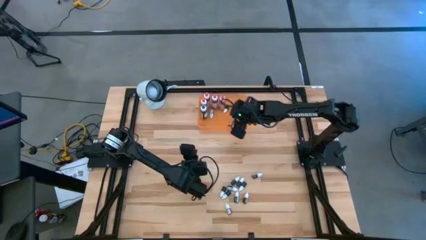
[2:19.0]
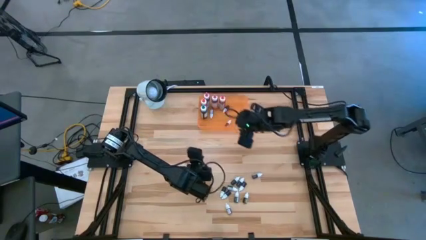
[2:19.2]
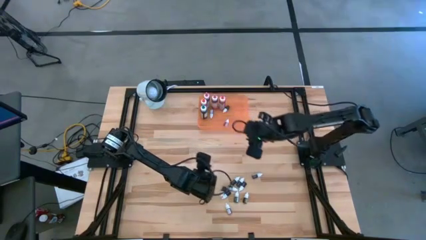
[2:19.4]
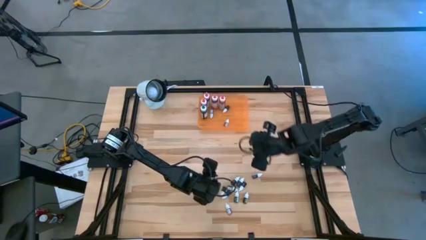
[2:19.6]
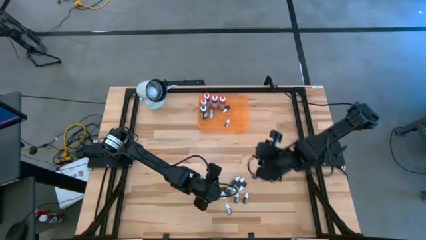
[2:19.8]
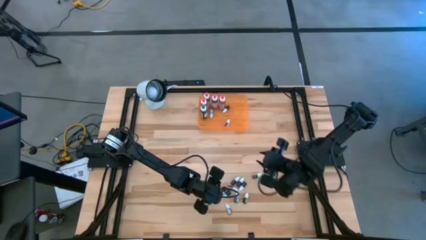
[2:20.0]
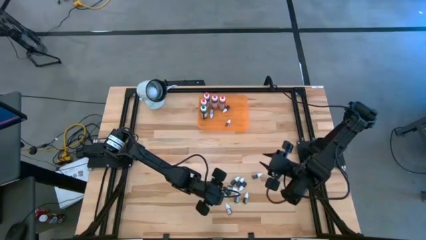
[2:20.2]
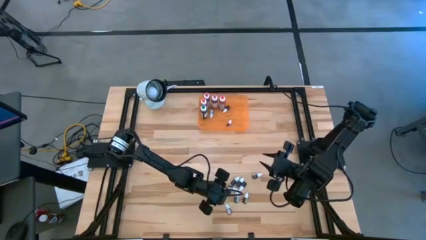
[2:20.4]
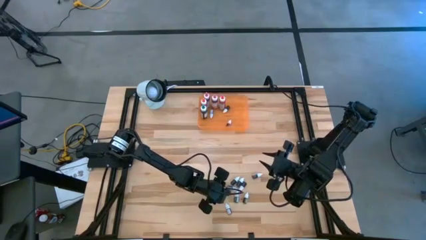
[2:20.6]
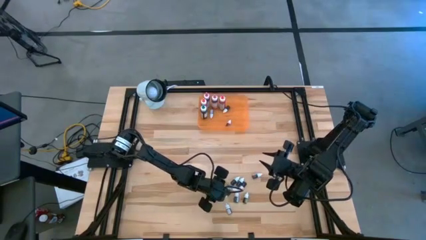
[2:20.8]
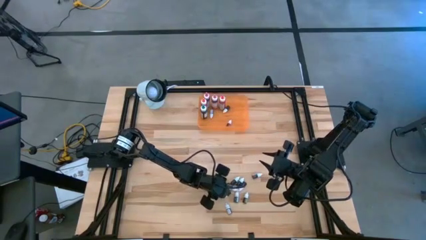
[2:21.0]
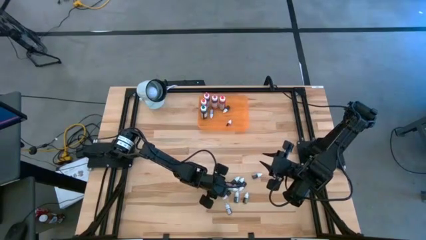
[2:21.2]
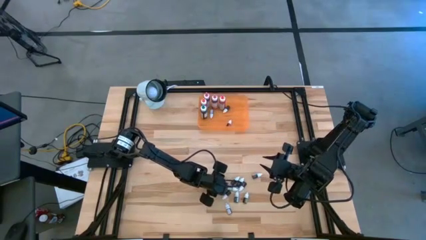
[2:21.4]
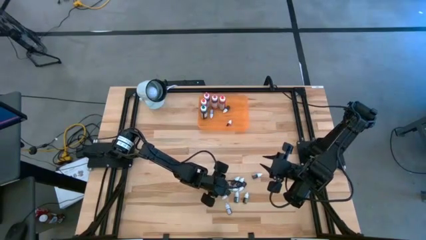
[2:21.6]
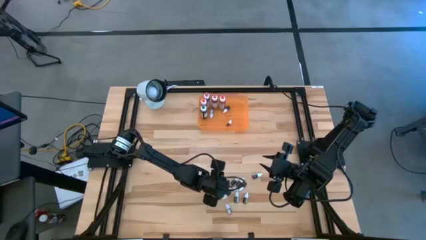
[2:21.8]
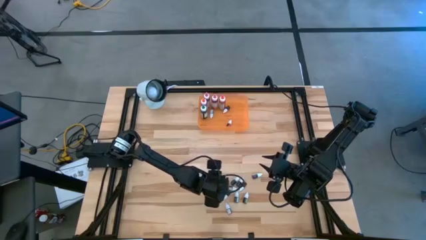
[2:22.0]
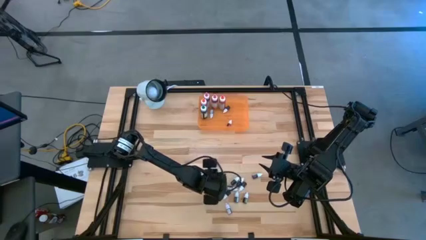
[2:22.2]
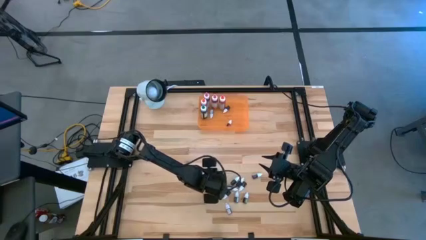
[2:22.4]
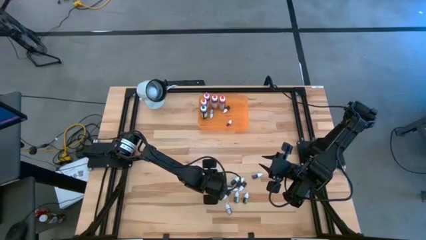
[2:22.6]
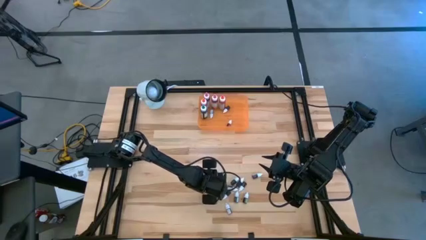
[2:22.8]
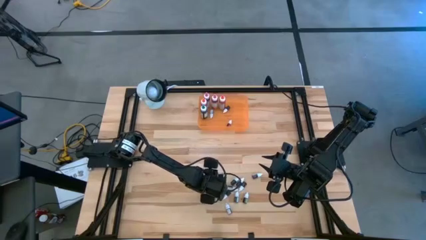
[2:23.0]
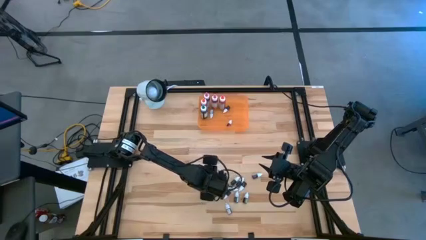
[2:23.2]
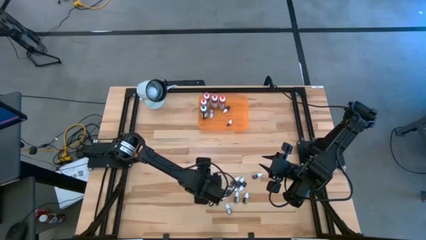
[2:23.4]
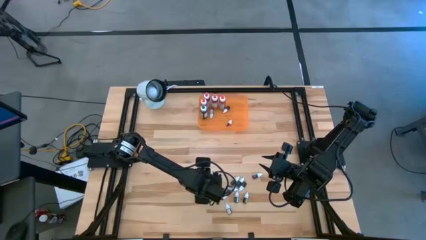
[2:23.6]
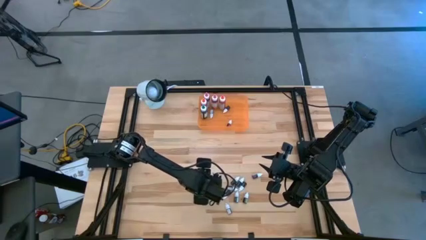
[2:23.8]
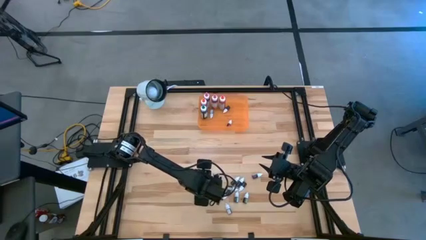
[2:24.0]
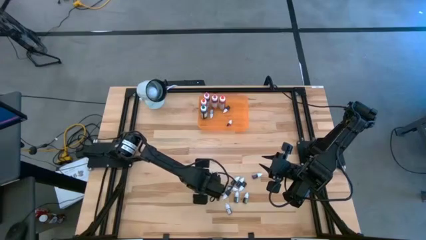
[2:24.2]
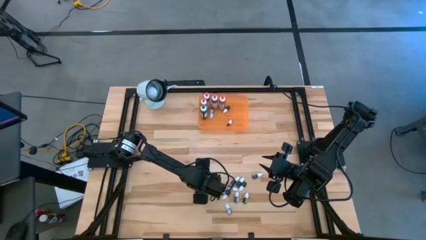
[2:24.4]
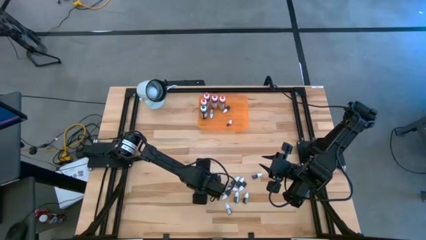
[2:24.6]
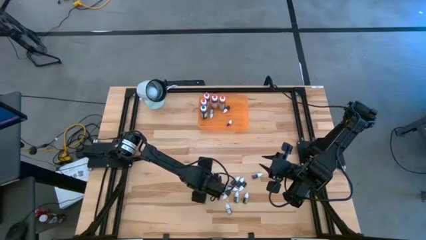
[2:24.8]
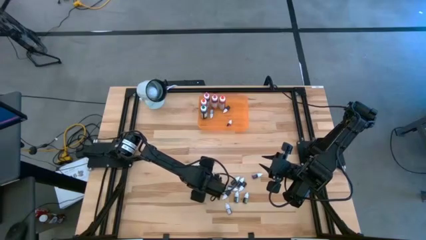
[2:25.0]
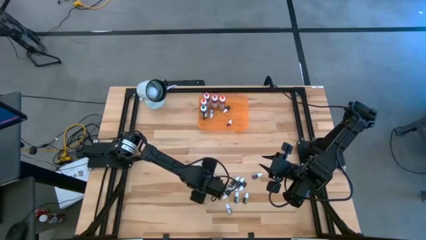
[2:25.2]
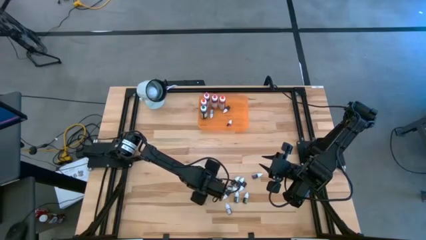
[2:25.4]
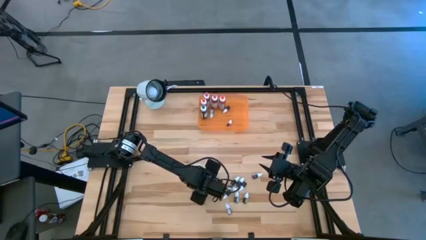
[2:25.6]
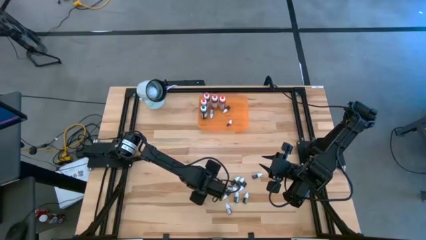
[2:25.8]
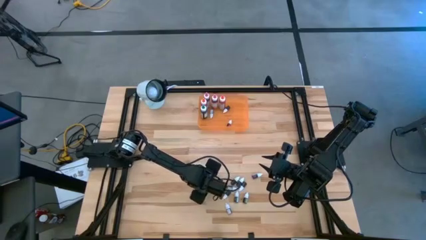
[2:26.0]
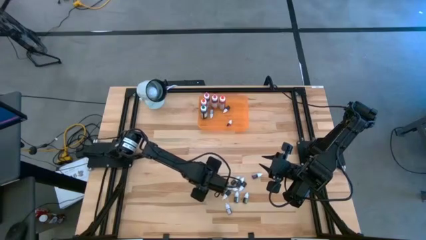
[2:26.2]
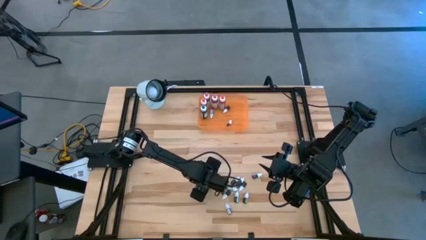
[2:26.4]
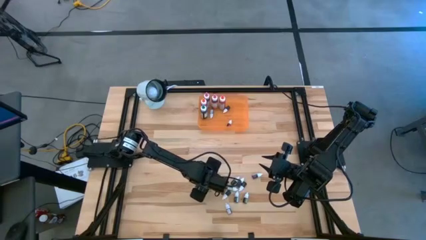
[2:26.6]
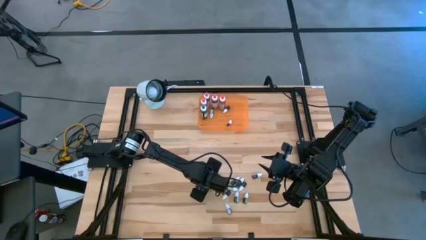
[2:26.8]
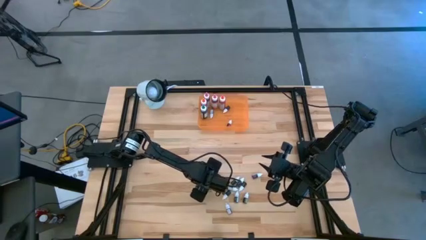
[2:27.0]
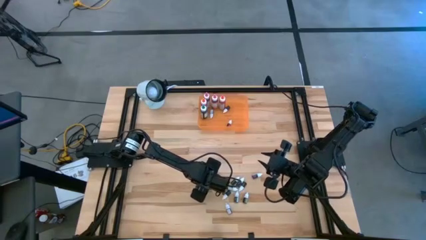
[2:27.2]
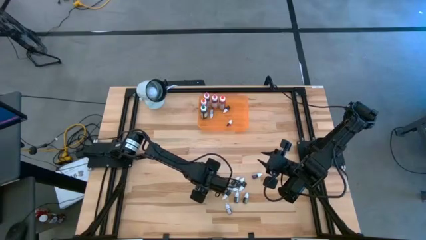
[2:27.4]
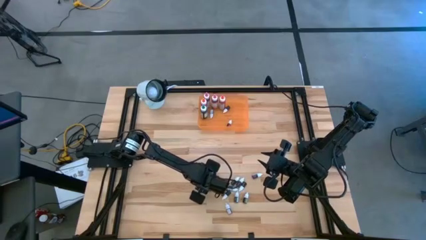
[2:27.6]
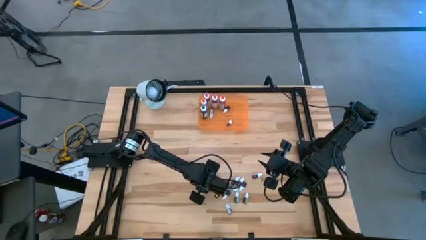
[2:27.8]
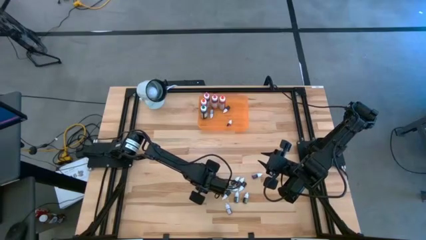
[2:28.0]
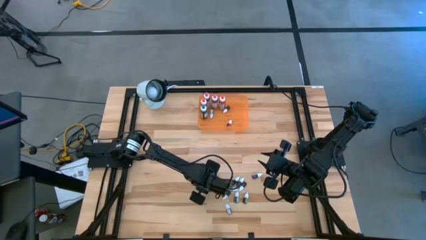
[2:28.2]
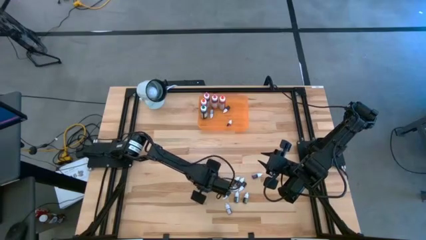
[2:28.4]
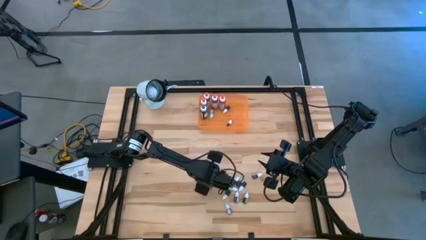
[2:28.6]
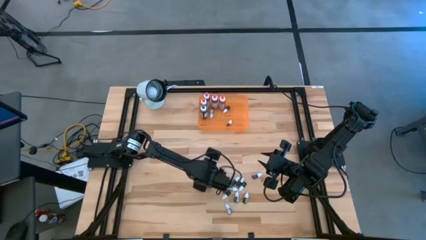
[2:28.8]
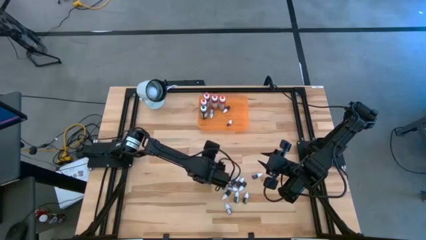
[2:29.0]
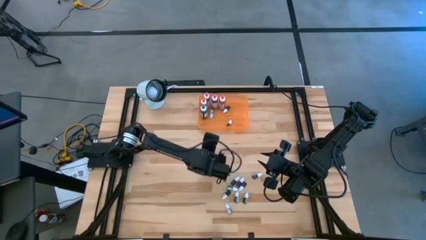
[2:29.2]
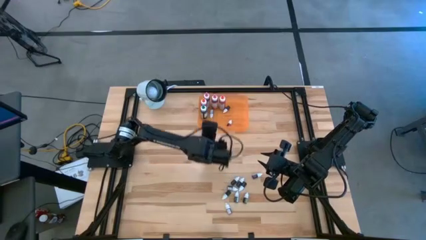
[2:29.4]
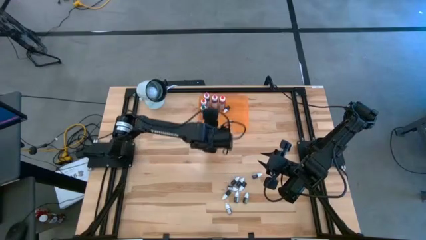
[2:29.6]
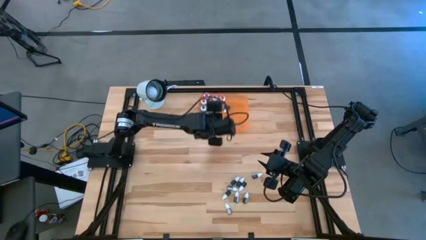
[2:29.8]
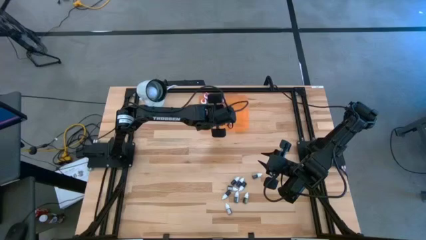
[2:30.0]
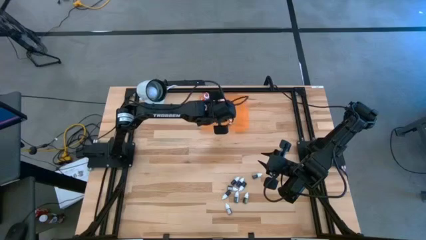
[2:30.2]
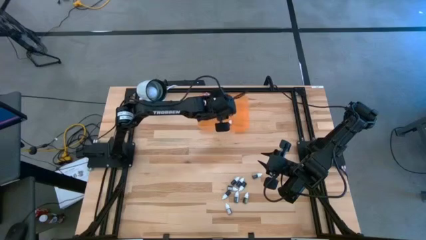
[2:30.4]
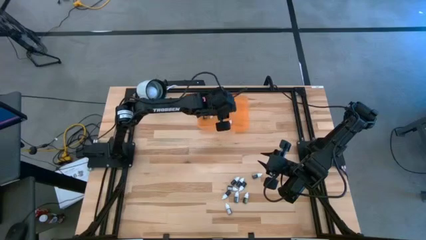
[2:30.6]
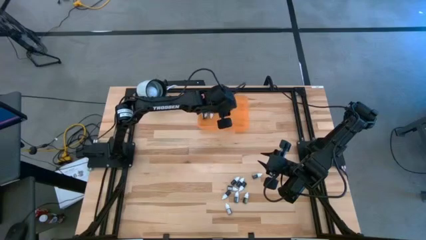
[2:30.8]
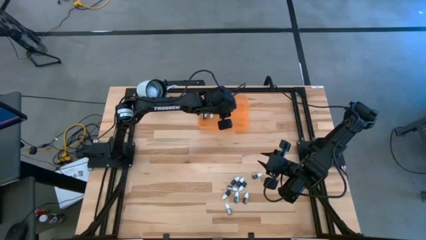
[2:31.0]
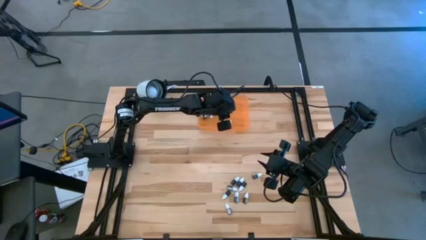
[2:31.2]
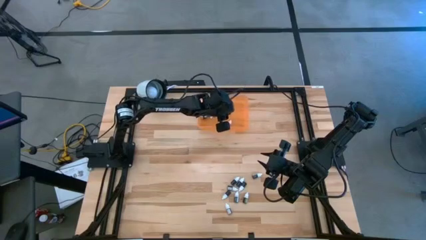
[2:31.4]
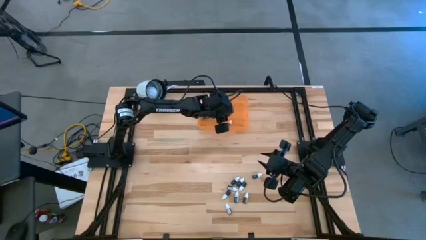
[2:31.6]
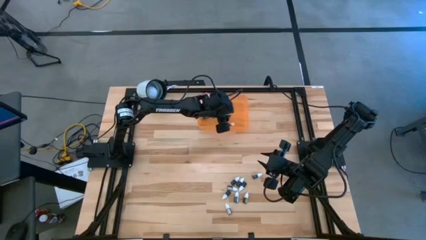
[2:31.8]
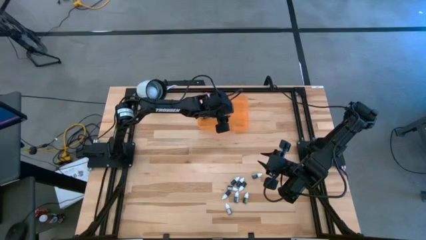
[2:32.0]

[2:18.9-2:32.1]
Task: Pick & Place food coloring
Put the black small food coloring bottle into the orange bin

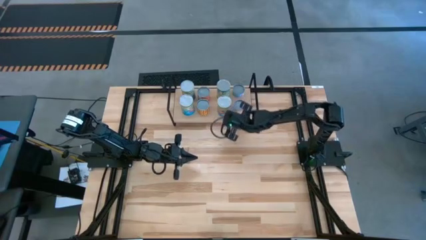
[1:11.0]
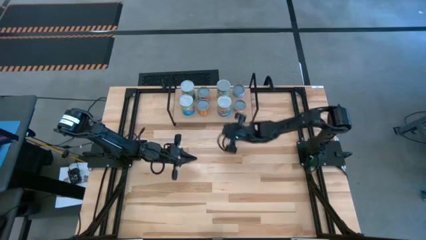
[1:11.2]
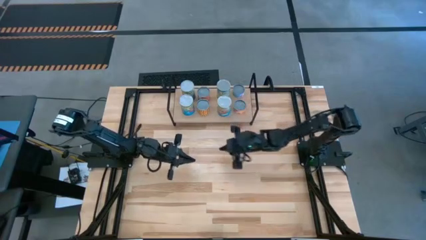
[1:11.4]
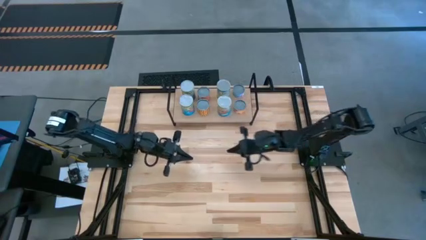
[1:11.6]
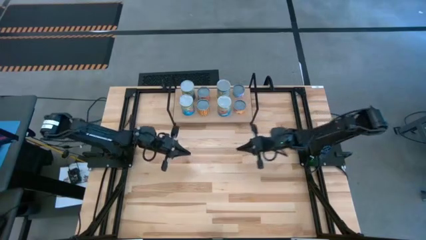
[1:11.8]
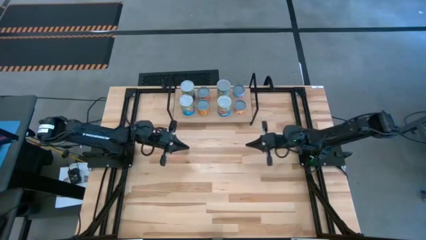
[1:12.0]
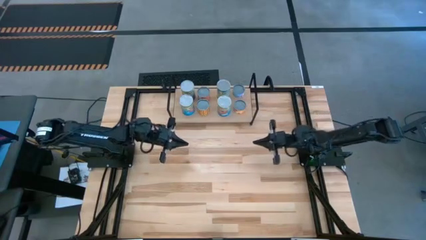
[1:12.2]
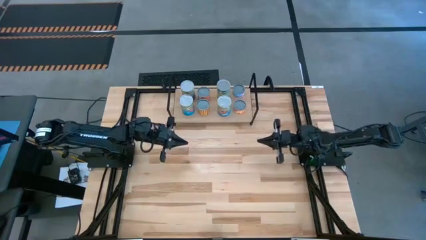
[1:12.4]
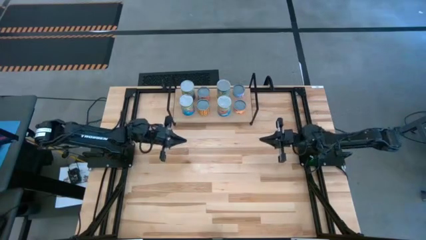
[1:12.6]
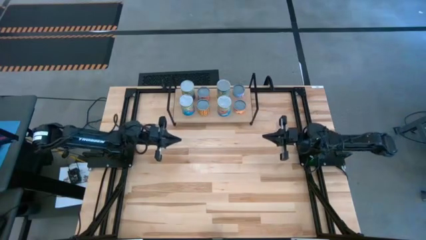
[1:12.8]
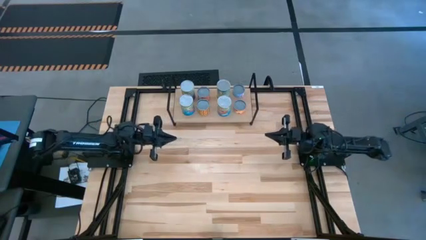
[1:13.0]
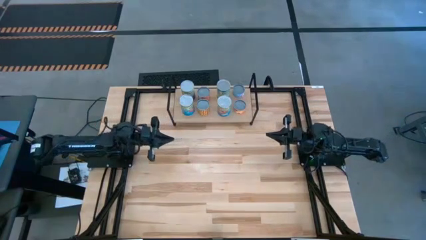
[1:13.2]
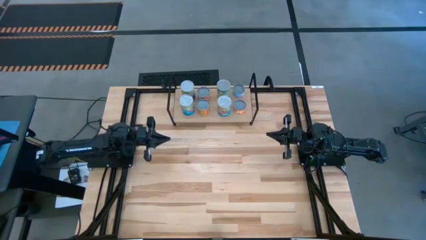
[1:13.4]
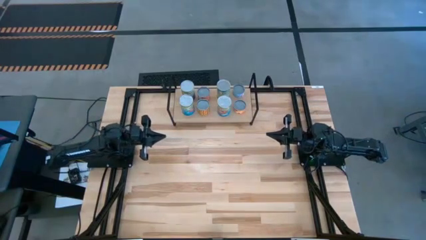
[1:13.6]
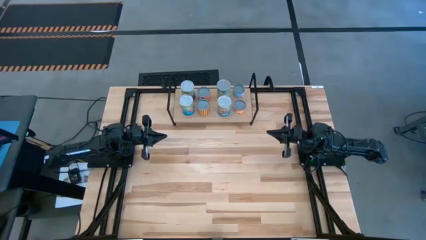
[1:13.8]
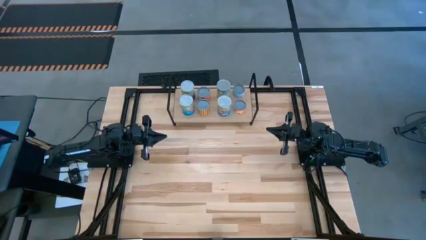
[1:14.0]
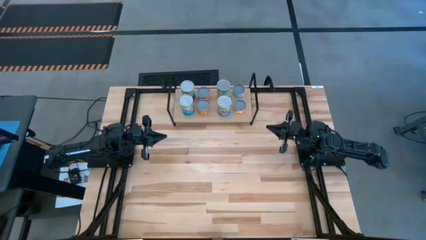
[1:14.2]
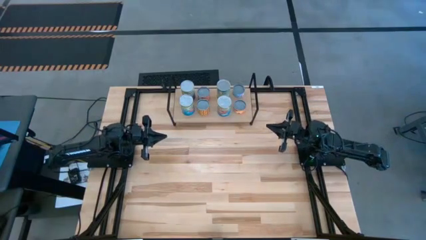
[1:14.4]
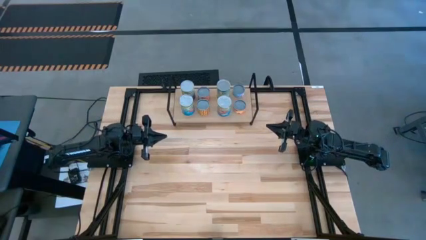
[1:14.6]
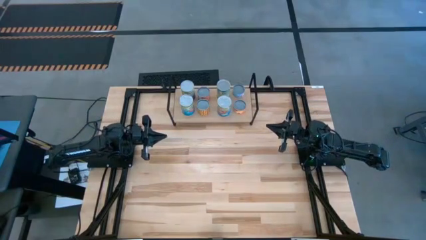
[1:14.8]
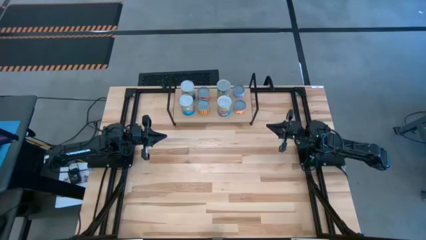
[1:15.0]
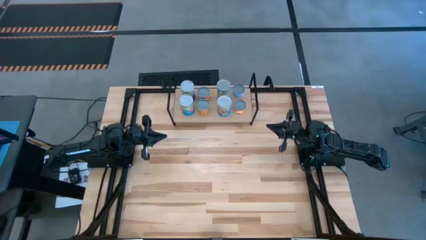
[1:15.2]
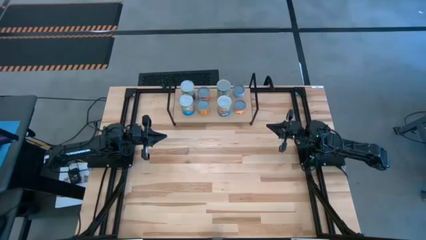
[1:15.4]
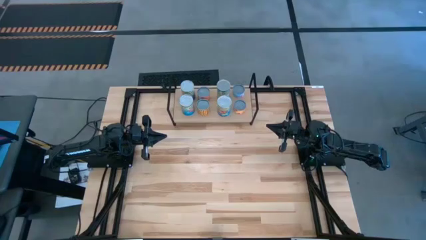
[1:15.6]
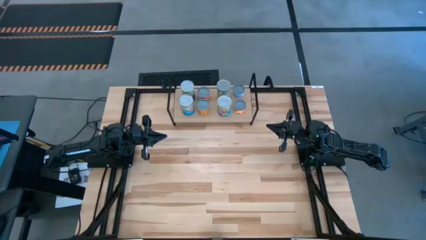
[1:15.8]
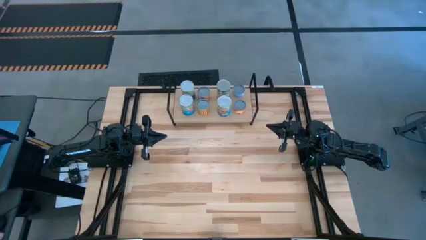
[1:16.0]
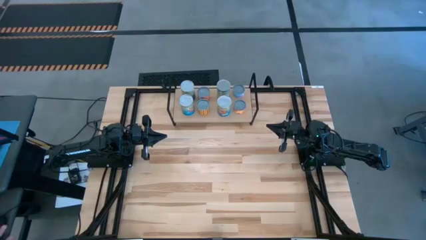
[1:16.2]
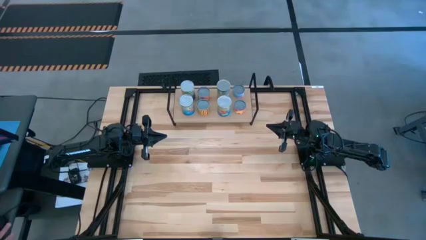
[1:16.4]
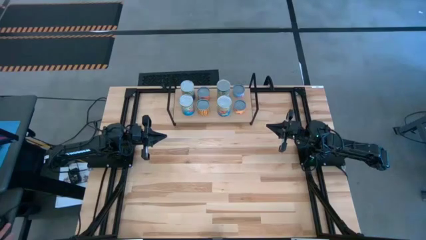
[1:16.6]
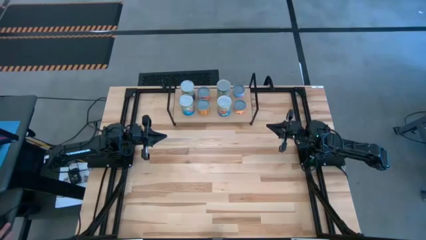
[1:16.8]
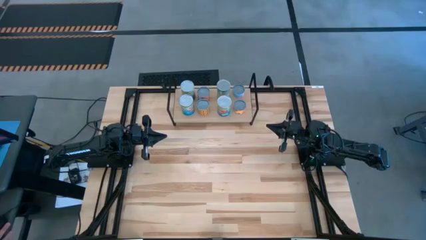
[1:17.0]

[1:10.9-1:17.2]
Task: Pick and place cans onto a shelf
Return to Home Position
